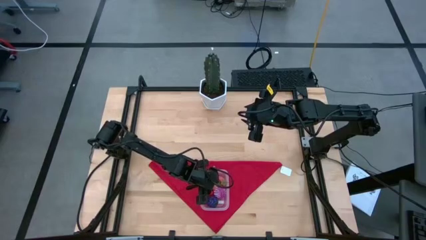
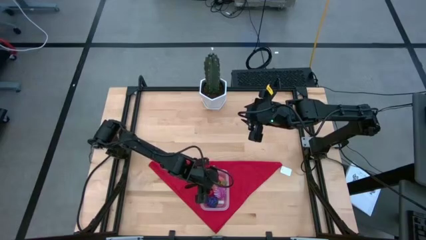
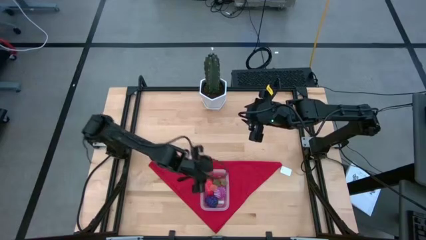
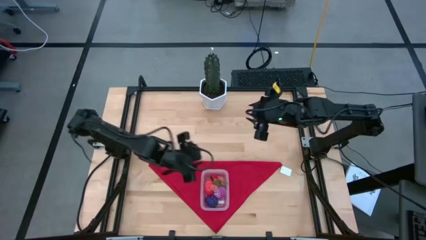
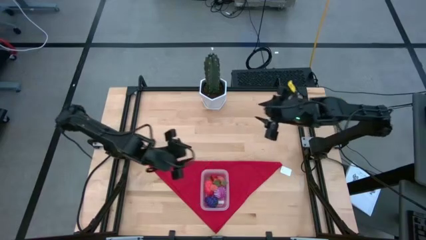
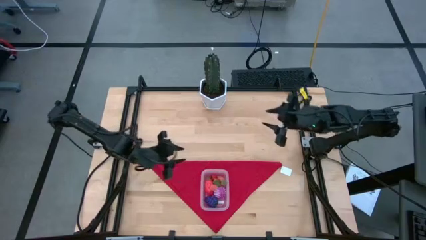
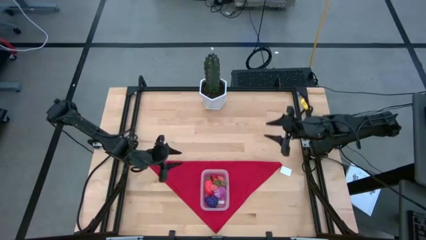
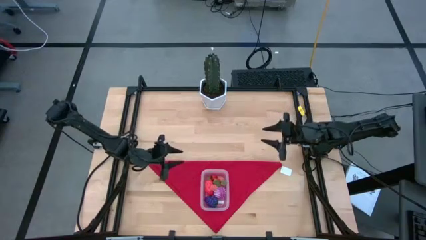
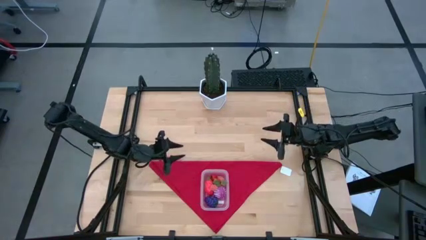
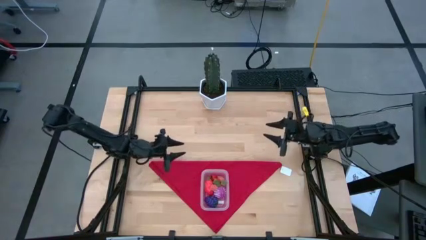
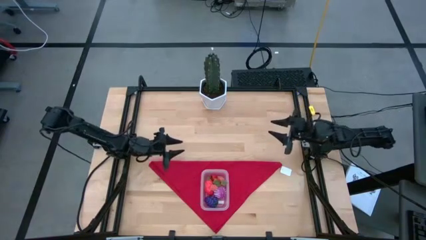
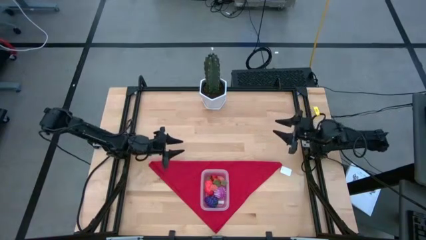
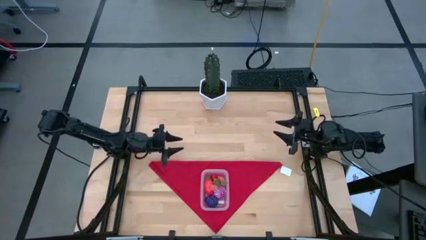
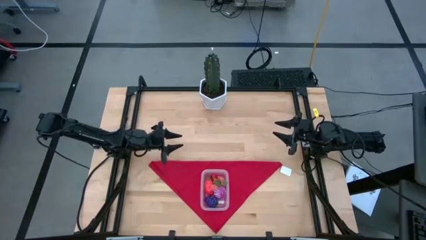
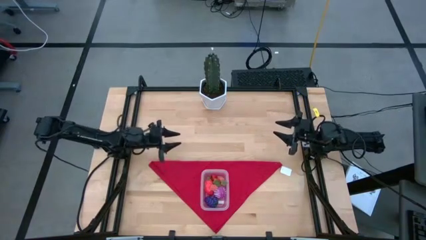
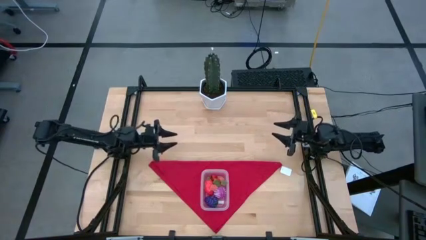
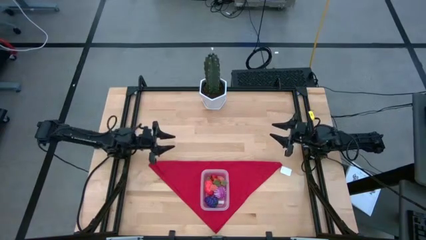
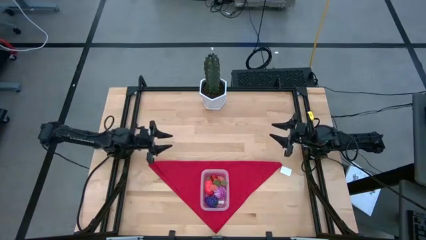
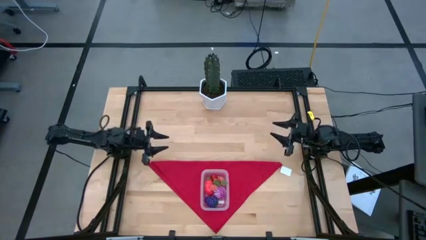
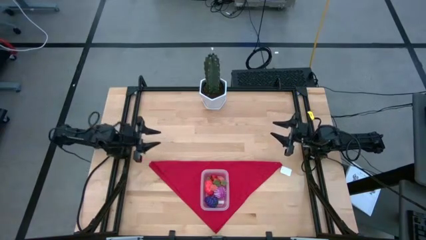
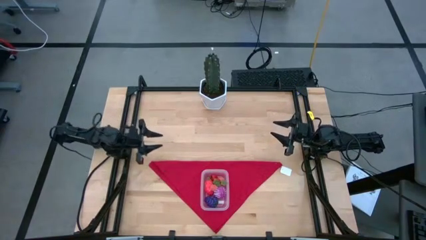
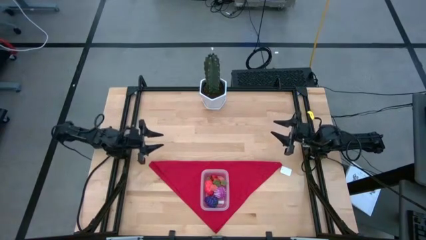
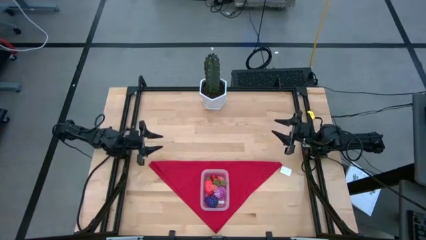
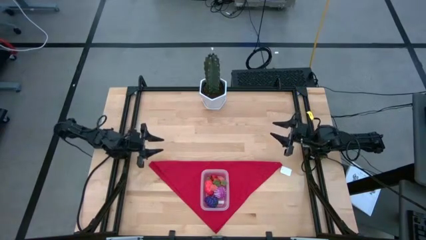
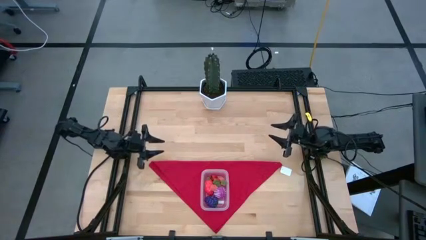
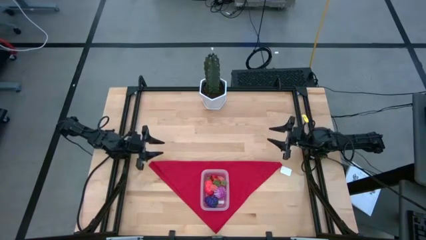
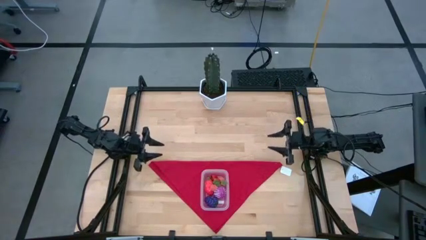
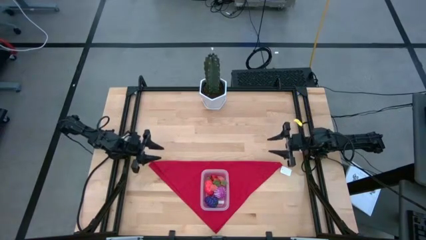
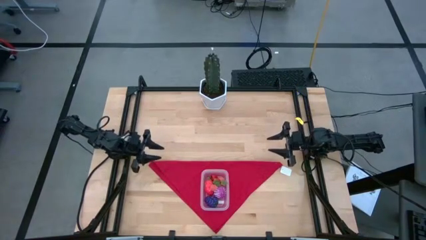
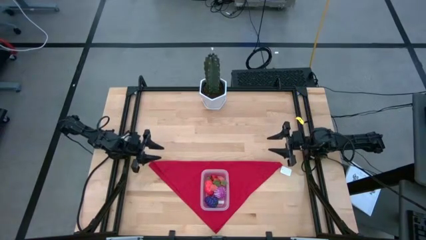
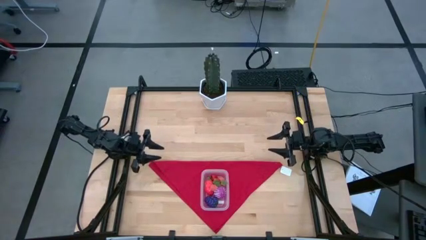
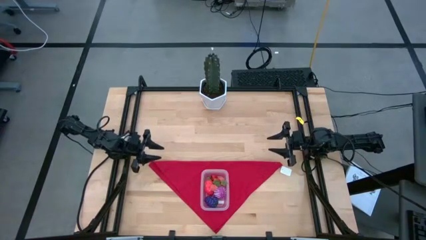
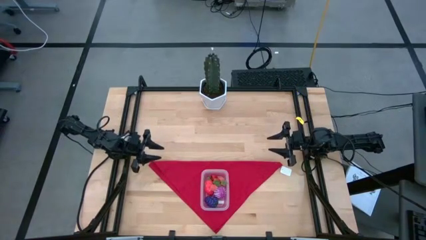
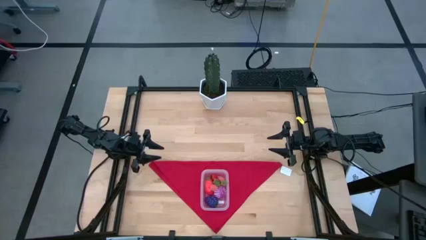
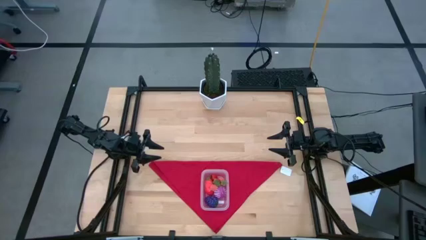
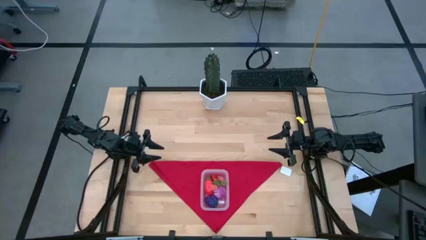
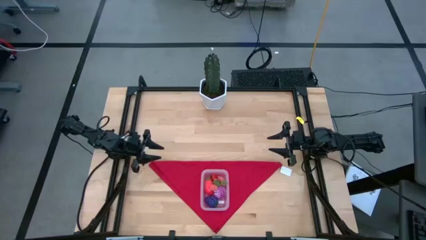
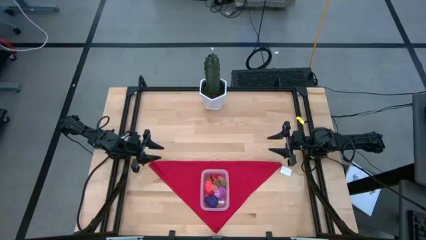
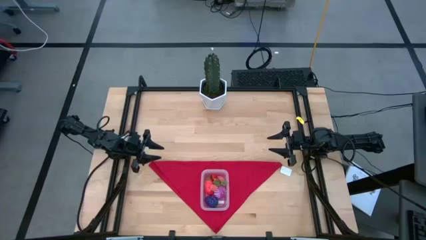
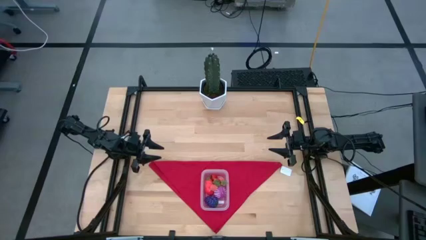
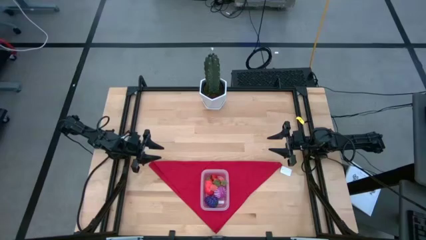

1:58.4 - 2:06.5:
Task: Pick and placing Produce into tupperware
Return to Home Position

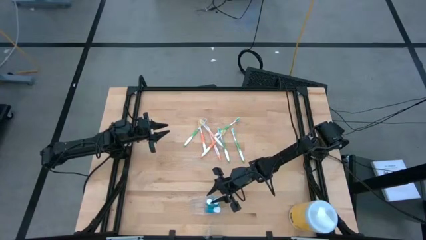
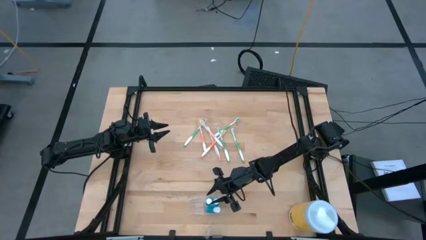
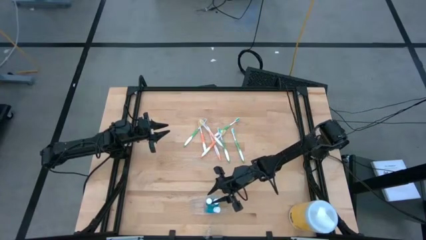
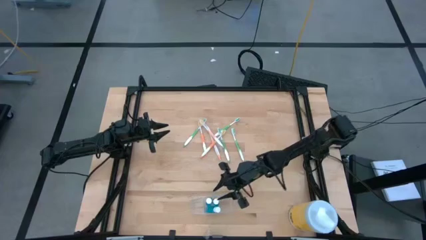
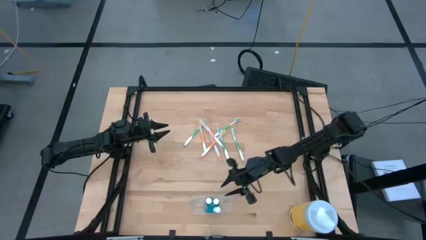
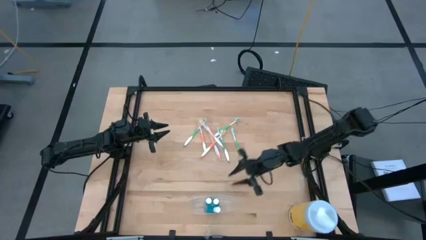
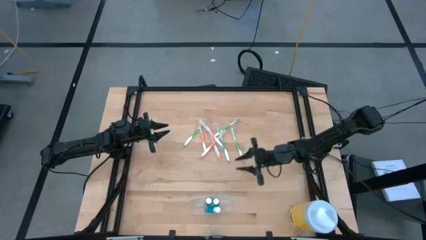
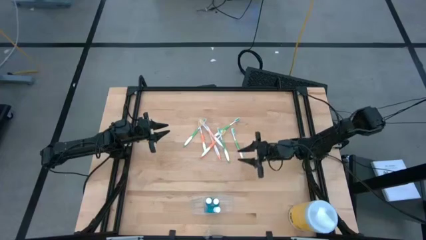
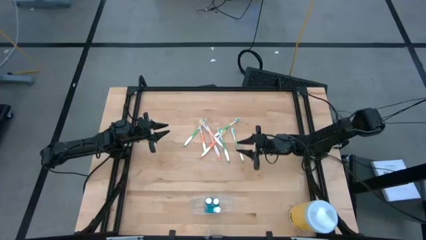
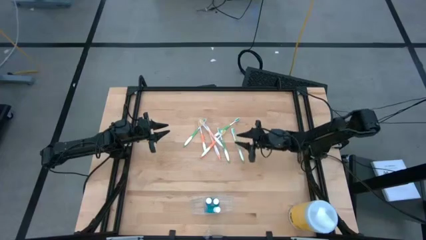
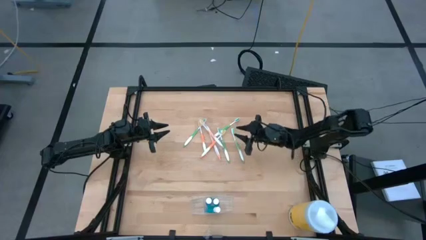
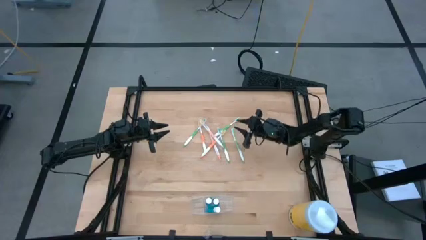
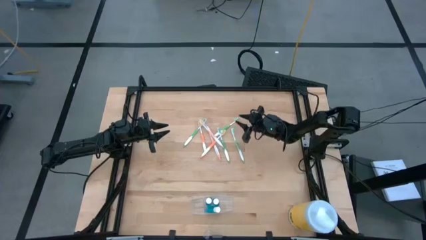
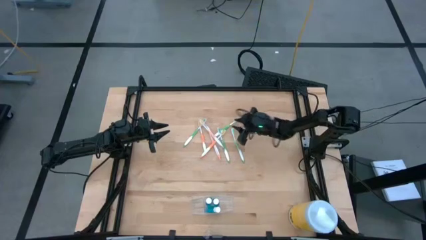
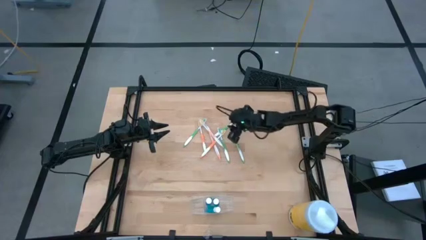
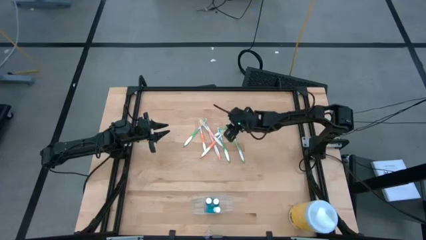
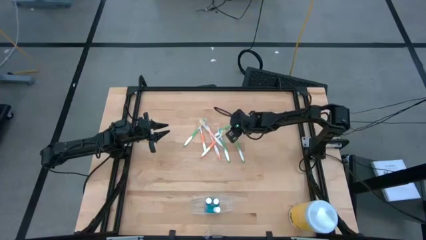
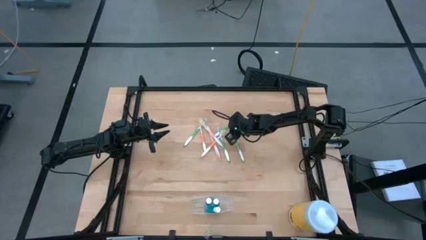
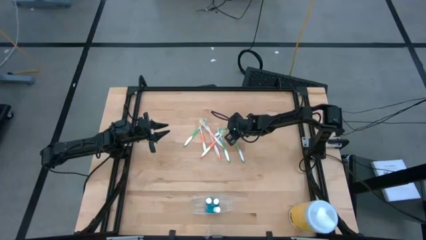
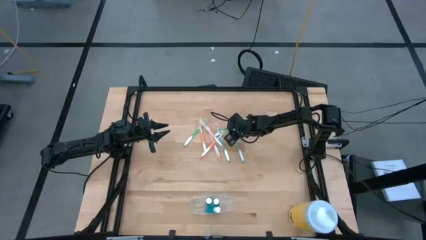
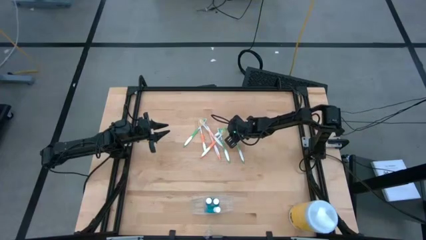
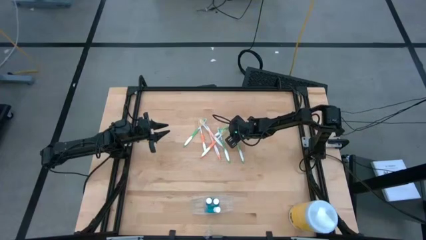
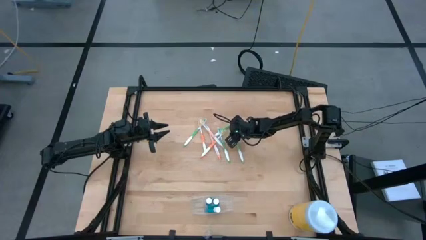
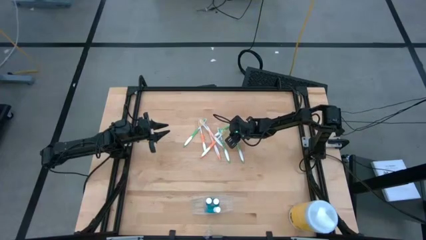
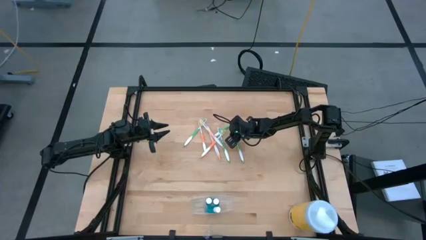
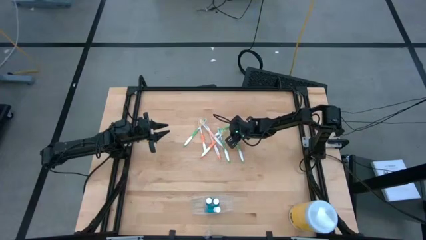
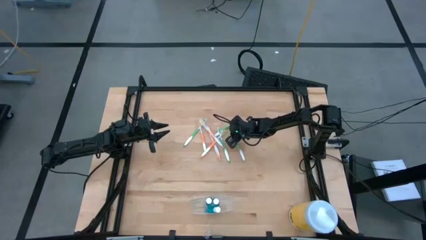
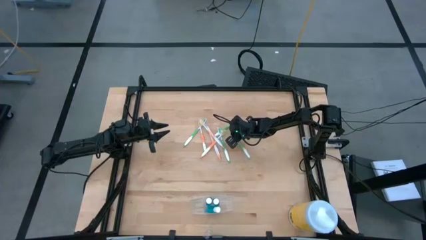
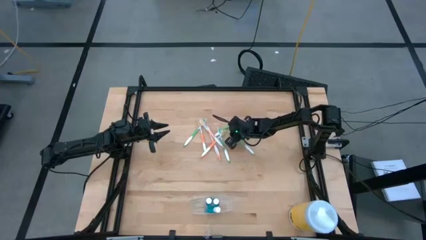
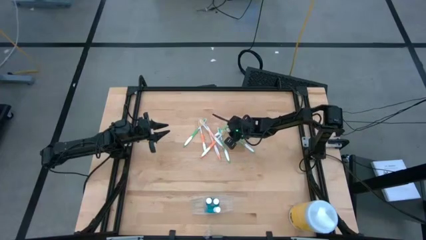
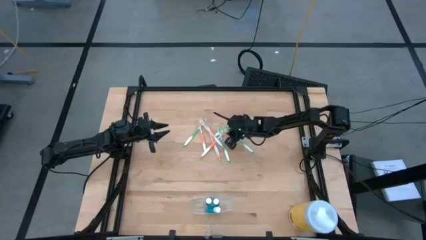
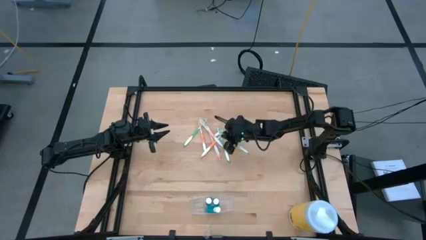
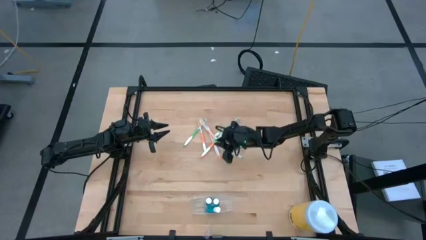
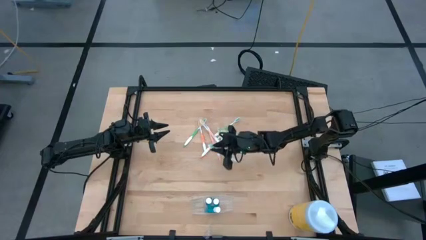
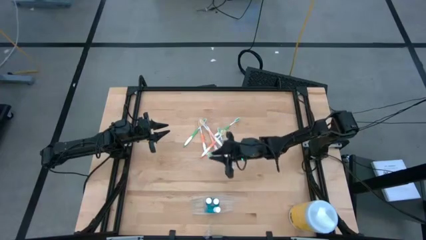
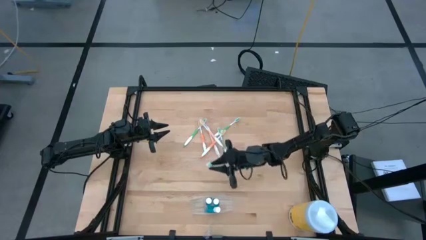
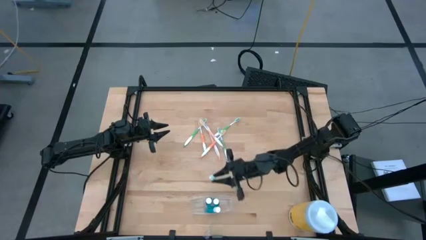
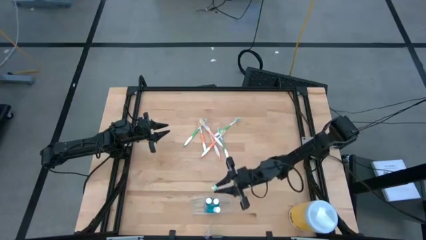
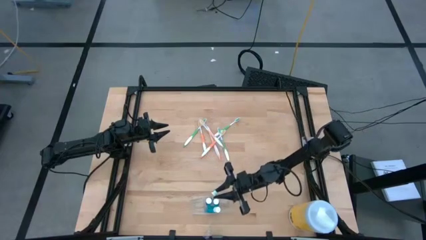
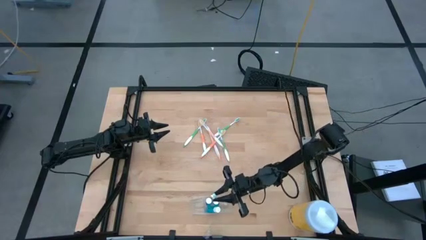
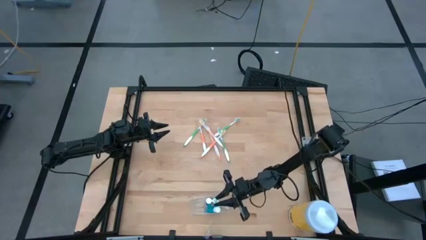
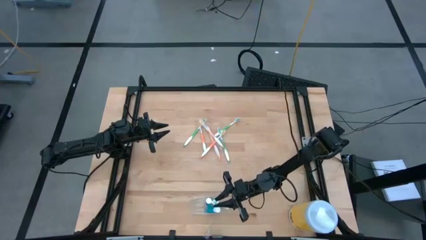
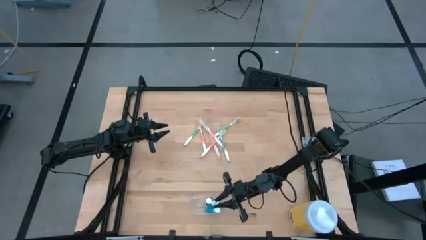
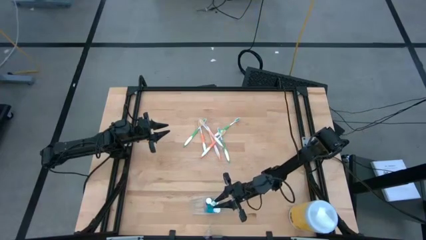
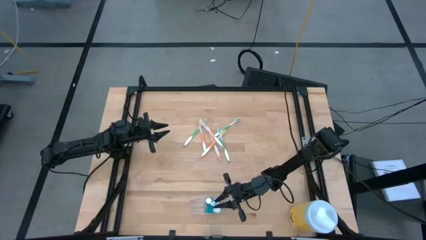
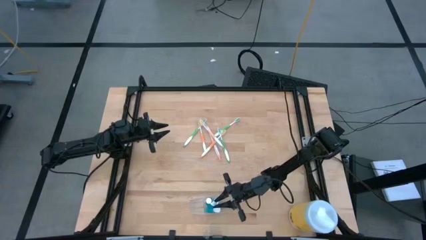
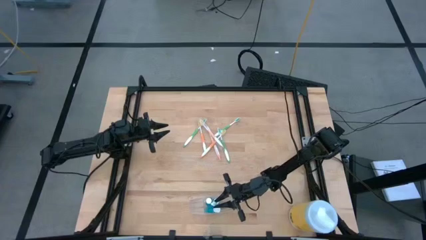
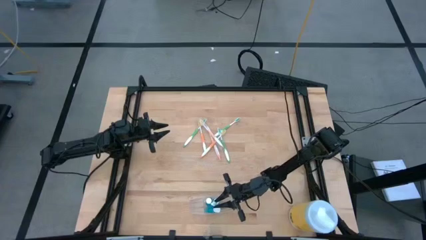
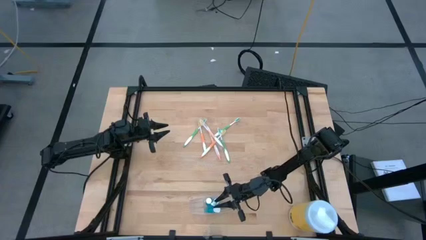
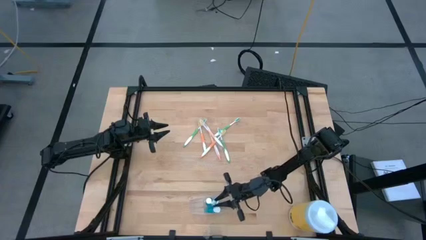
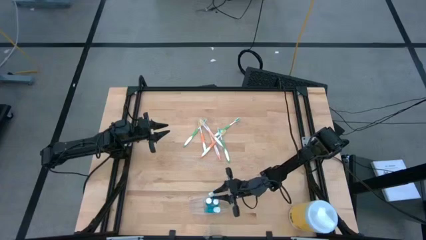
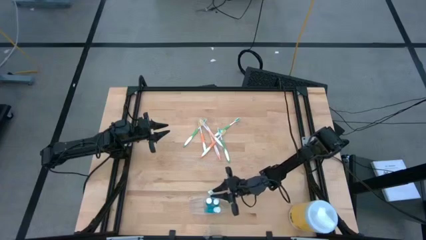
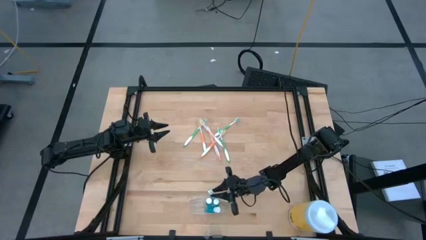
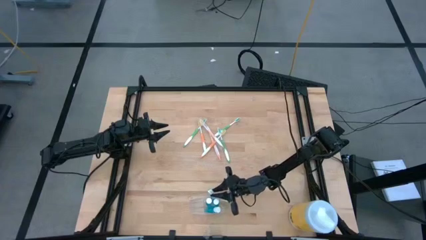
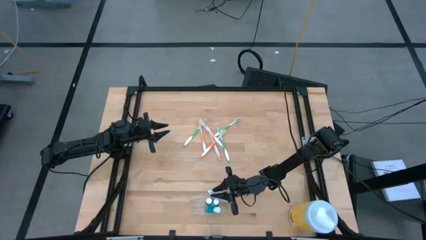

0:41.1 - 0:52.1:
Task: Pick & Place toothbrushing station
Put the green toothbrush into the transparent organizer
